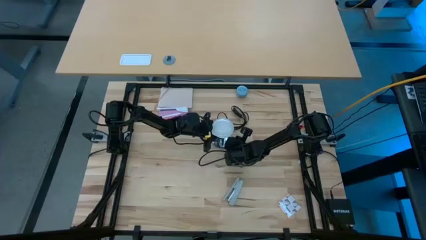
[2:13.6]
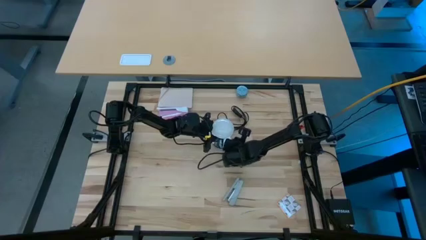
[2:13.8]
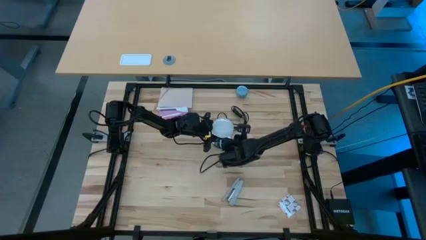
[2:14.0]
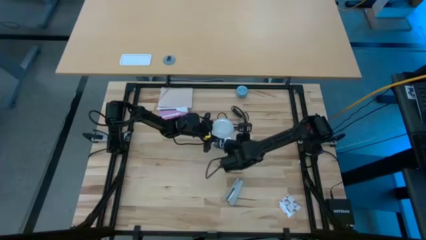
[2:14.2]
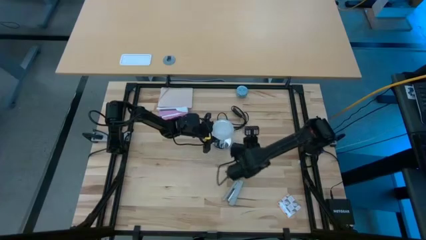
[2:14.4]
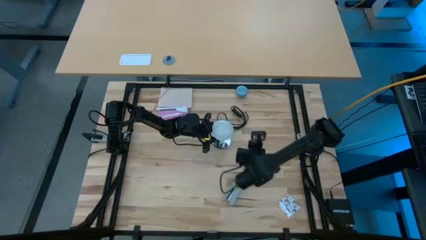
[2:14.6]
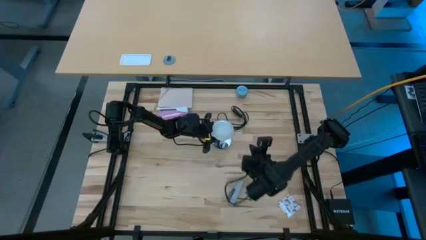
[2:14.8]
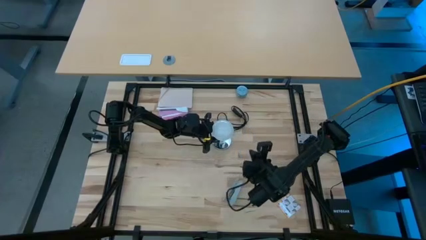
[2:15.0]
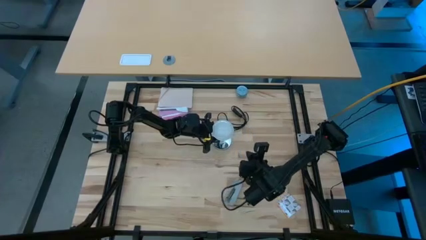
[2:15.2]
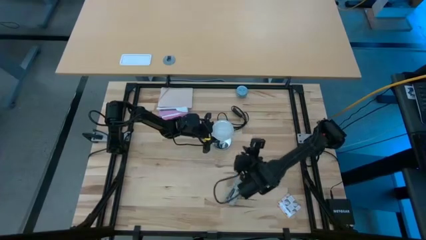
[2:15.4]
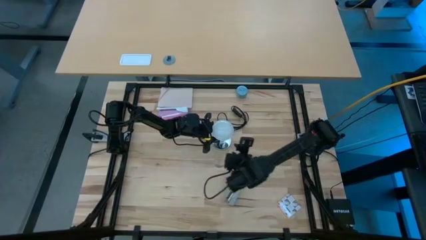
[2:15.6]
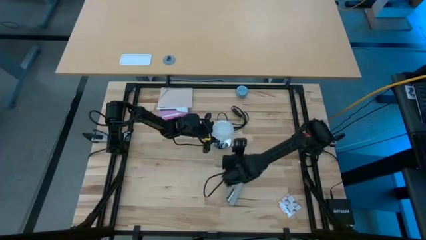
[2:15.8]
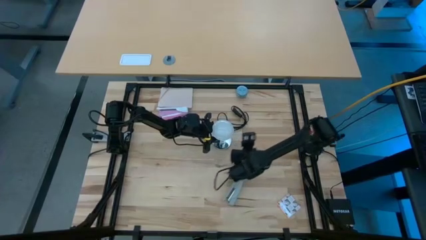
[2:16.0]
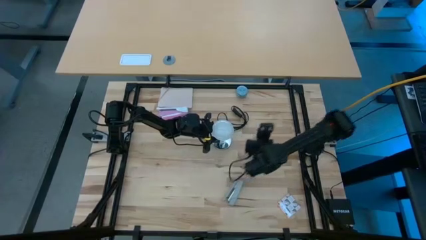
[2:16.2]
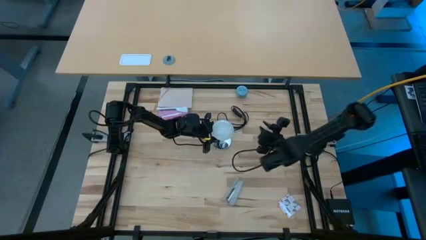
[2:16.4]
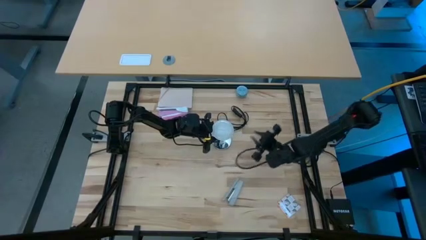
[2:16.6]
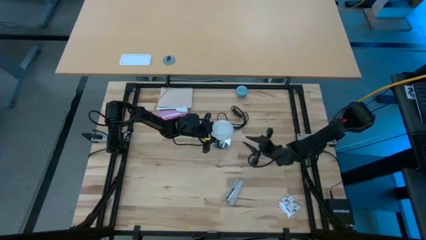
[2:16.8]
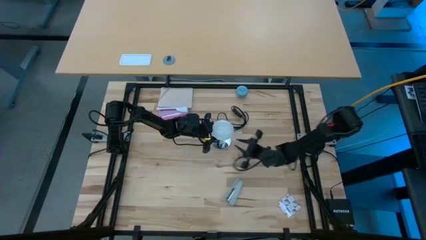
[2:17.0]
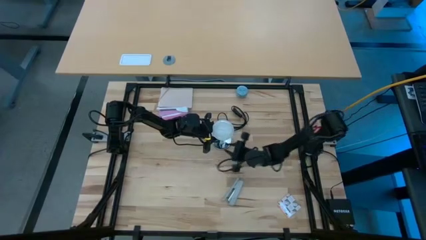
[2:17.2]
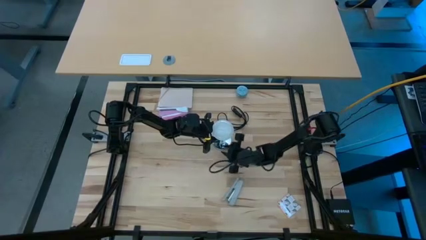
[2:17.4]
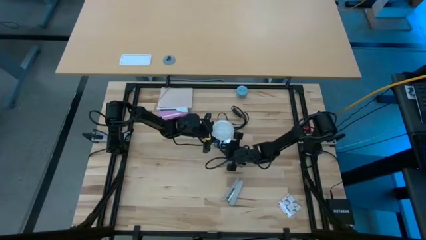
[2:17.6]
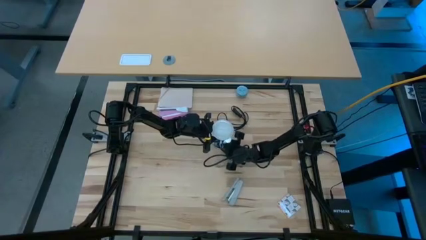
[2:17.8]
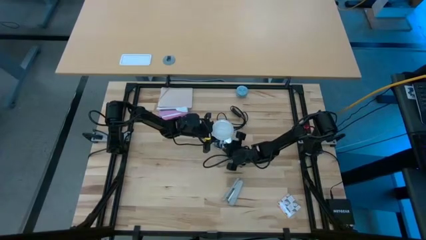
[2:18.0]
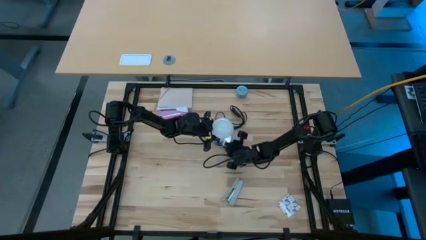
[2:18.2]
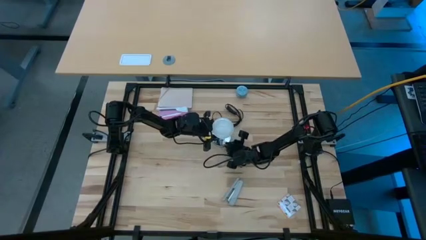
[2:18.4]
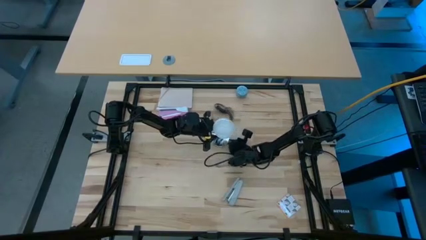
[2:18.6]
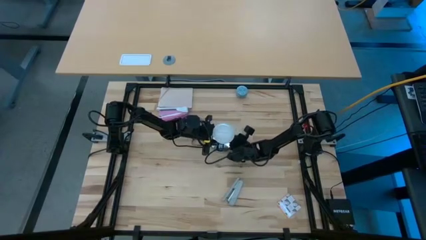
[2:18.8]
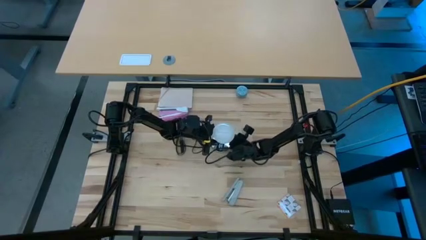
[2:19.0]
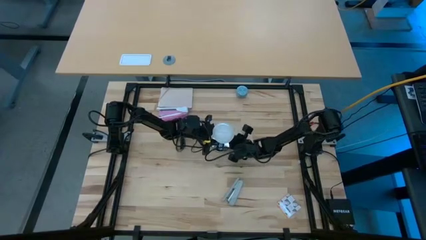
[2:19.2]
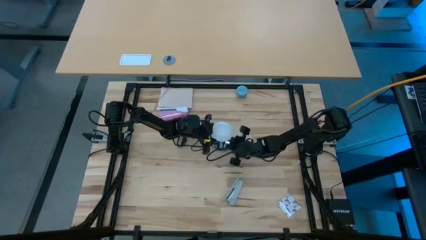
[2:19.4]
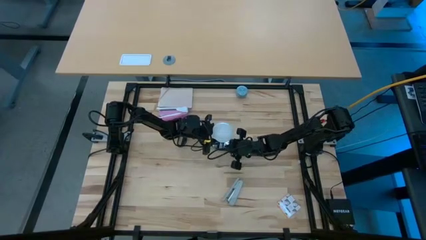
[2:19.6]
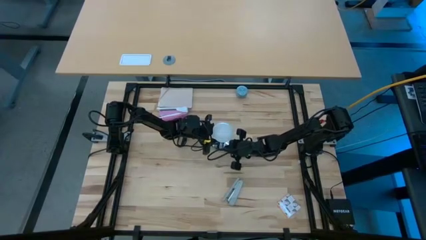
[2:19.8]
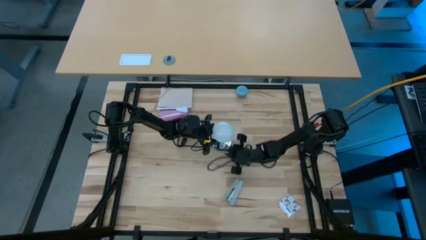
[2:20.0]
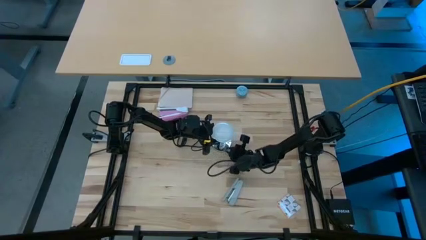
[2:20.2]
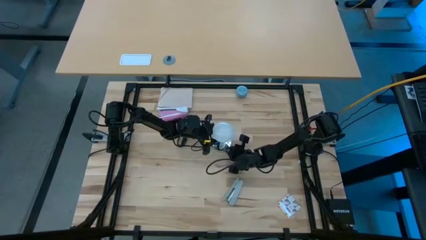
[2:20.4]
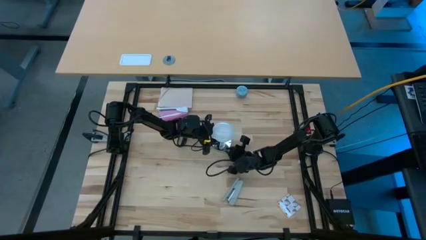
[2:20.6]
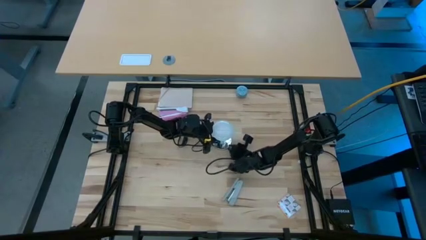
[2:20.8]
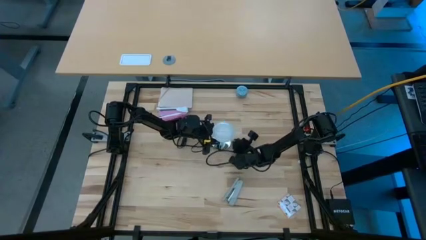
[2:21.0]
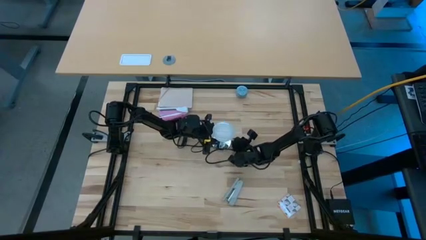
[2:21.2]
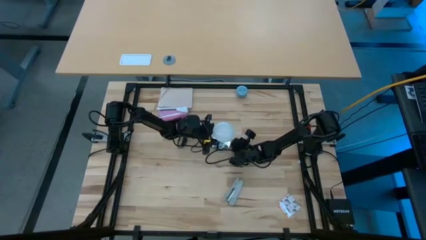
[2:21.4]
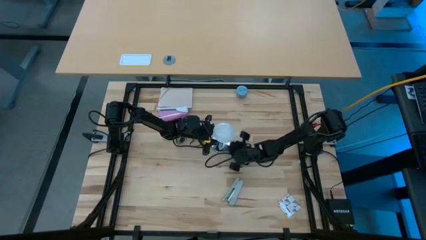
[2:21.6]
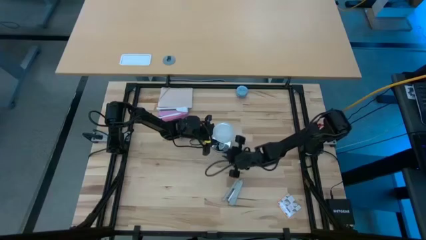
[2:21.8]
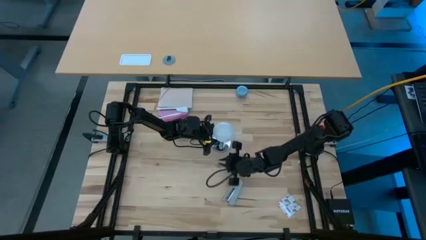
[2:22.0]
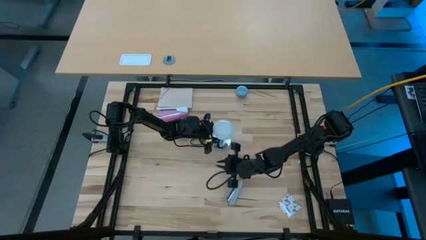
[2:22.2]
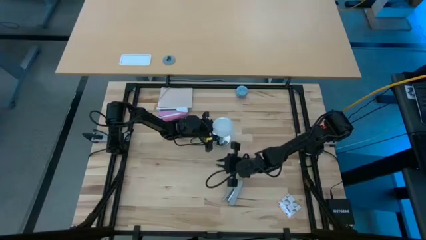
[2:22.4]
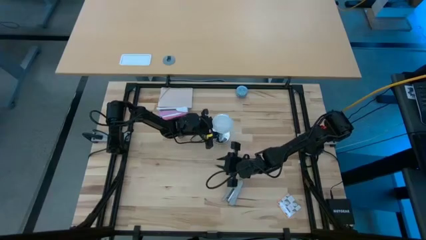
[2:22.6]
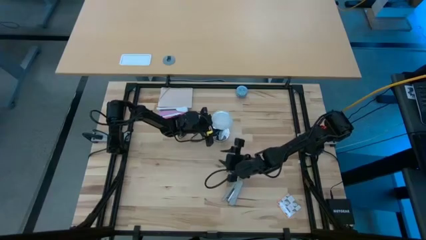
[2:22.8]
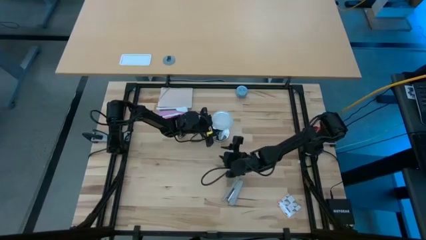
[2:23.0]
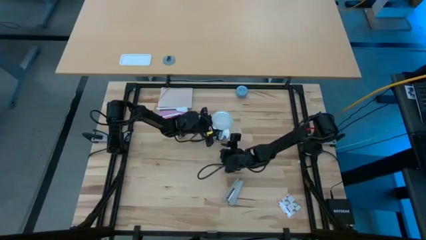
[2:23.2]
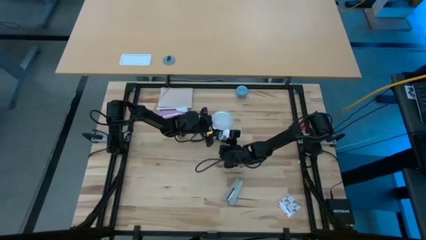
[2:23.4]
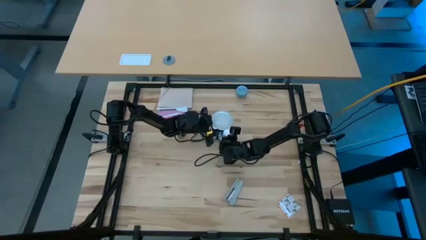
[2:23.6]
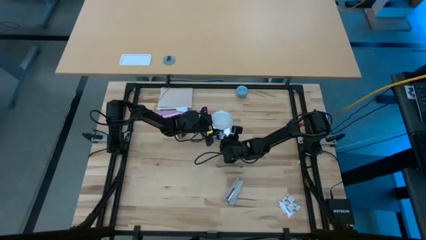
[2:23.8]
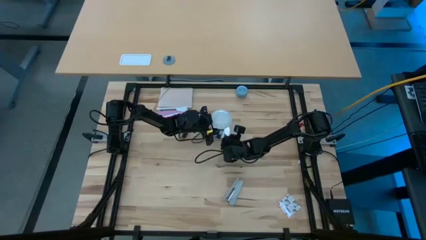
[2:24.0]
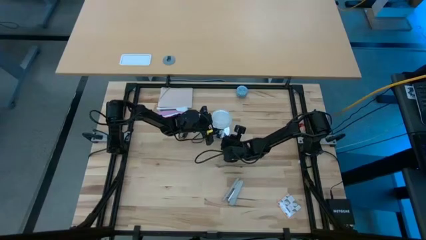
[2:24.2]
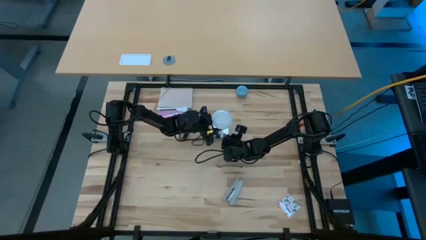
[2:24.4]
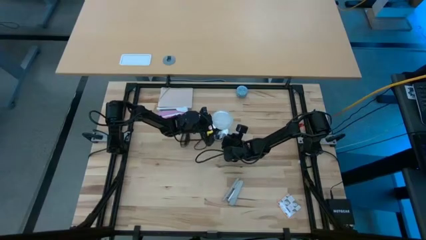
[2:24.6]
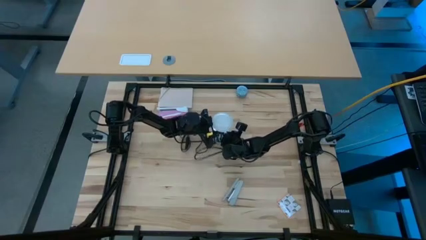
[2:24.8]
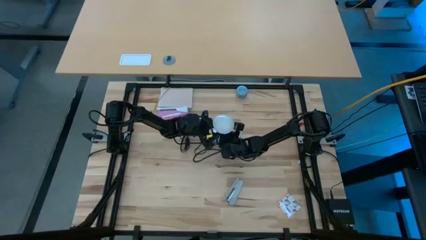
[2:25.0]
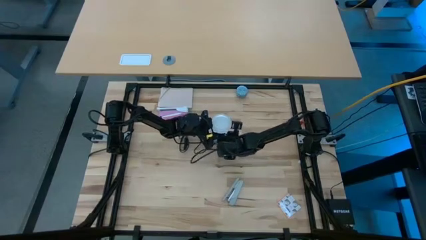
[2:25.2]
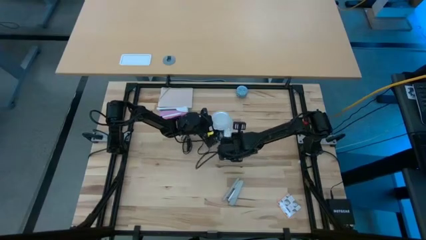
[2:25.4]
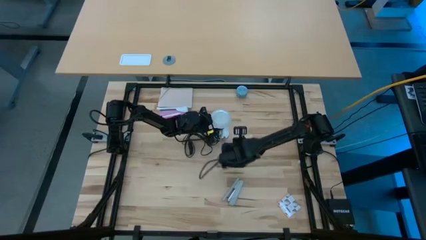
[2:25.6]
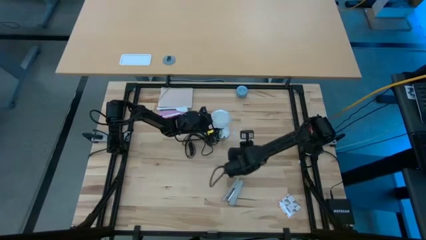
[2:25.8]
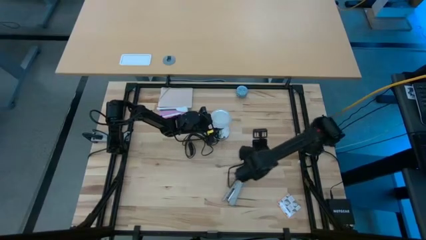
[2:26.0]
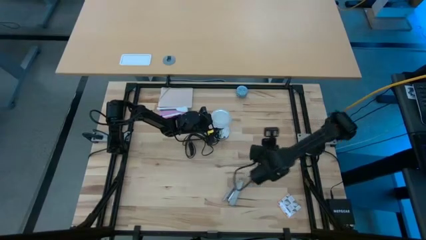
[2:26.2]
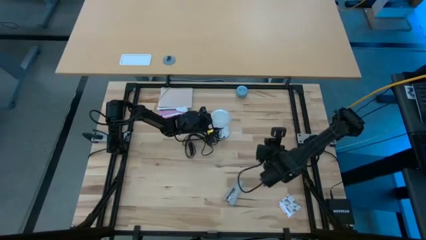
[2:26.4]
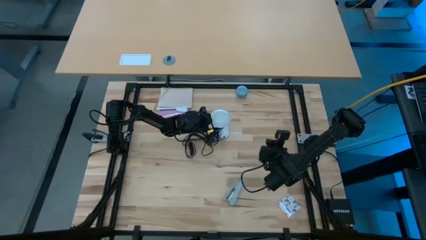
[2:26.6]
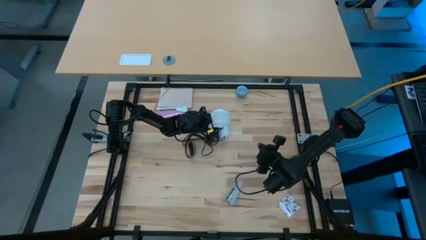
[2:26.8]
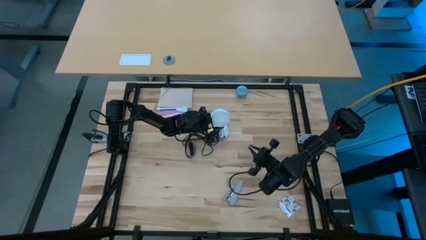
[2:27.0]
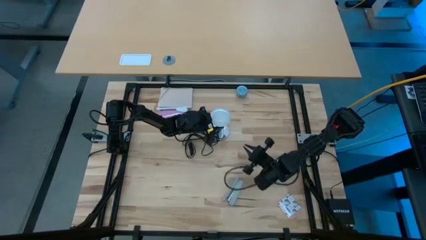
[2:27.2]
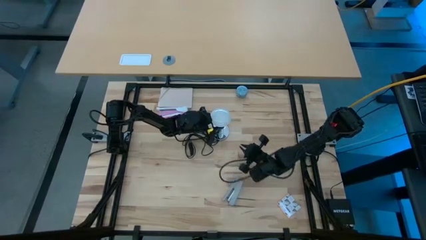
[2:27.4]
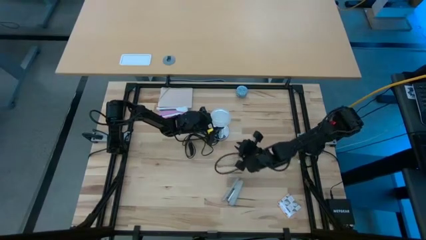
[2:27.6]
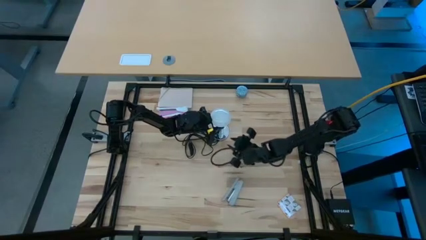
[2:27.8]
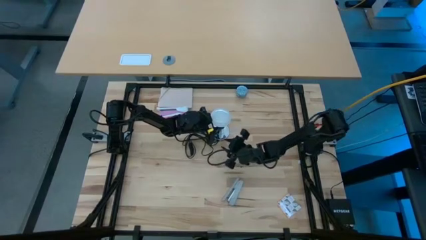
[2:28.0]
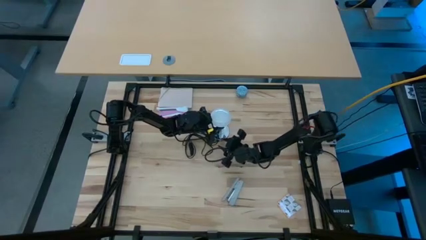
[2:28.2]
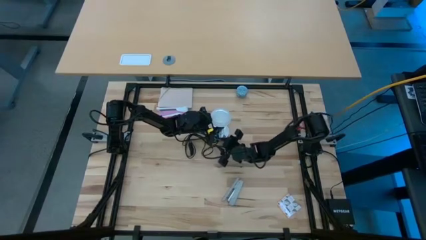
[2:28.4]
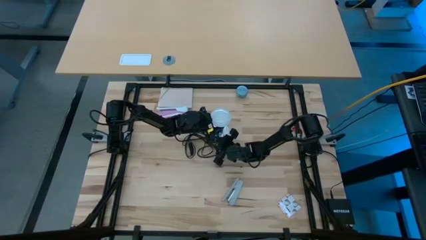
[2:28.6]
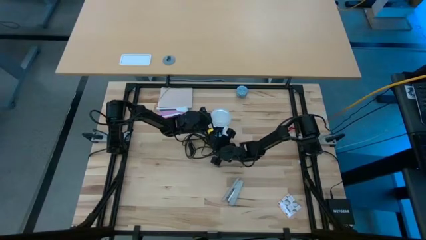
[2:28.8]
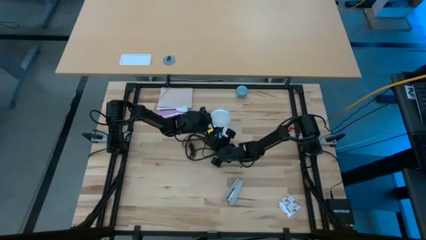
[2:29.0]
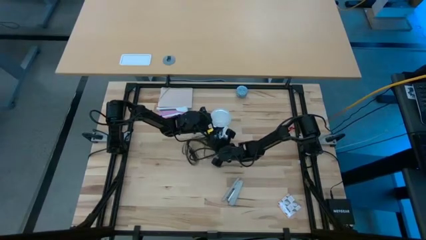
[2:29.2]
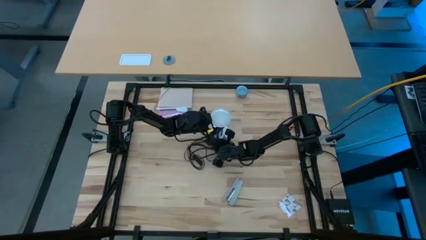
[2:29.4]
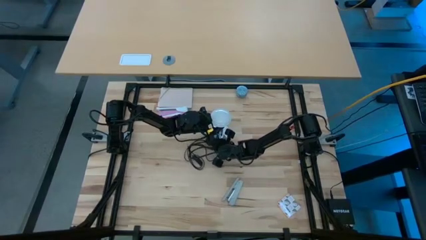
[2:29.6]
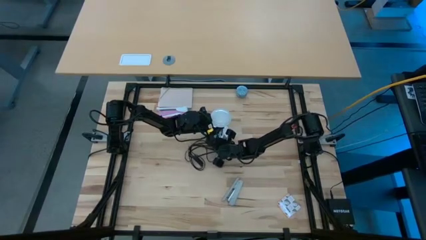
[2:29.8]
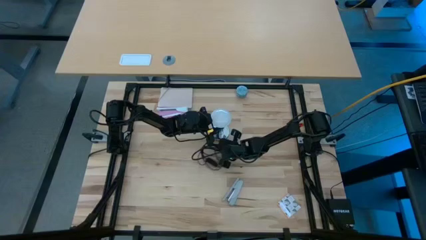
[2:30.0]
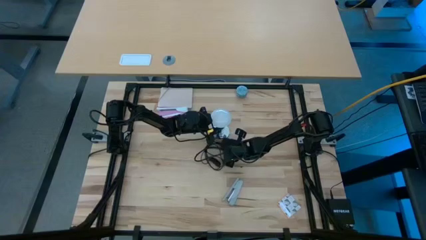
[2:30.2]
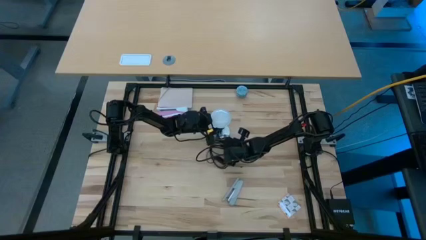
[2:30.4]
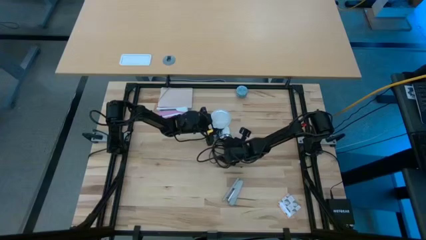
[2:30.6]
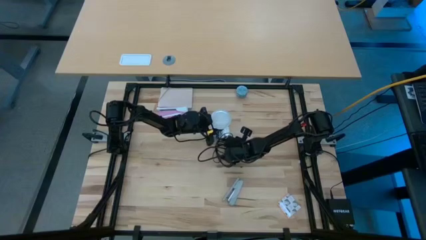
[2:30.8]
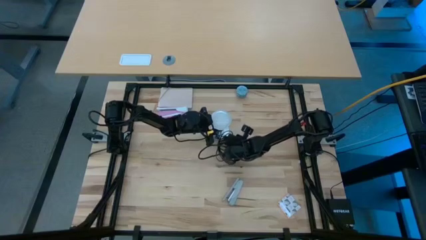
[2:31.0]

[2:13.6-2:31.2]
Task: Screw lightbulb
Insert light bulb into the lamp
